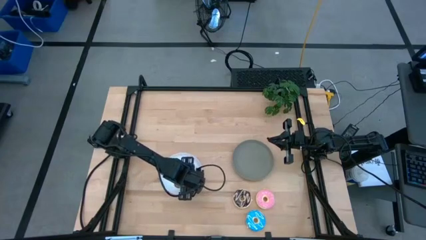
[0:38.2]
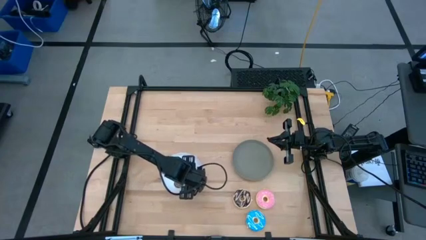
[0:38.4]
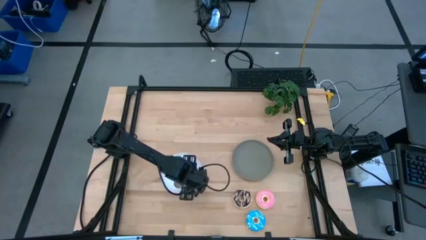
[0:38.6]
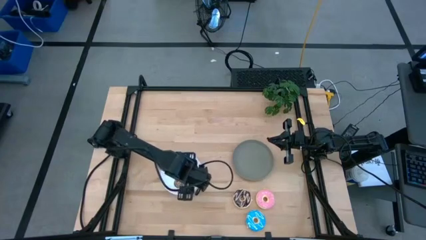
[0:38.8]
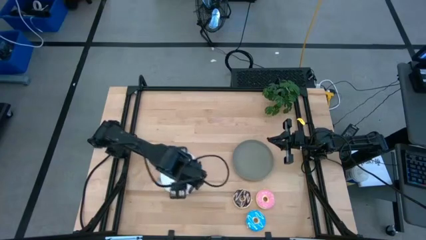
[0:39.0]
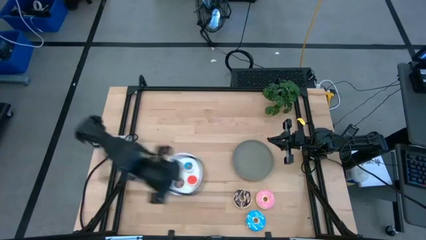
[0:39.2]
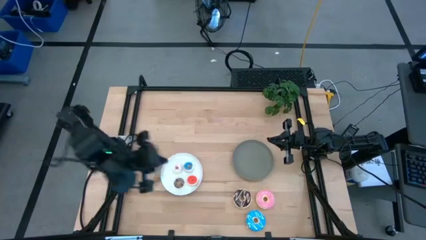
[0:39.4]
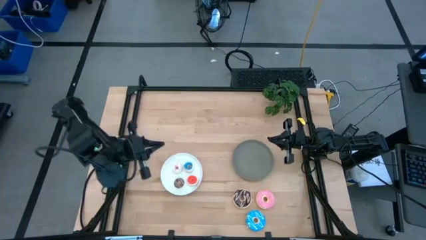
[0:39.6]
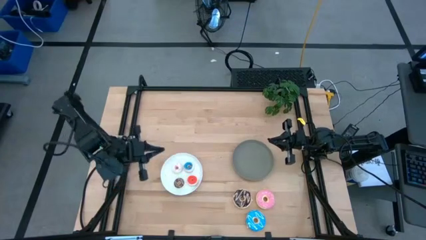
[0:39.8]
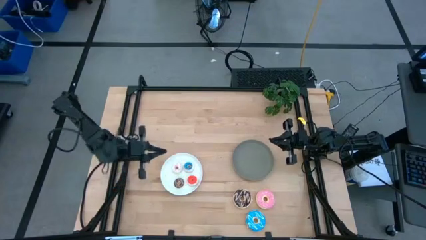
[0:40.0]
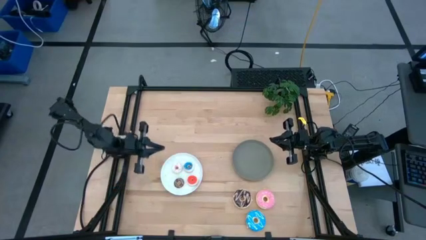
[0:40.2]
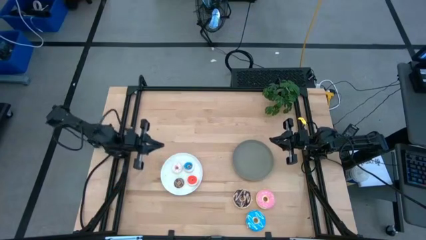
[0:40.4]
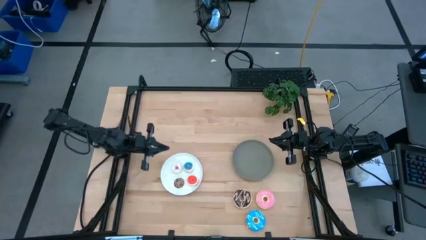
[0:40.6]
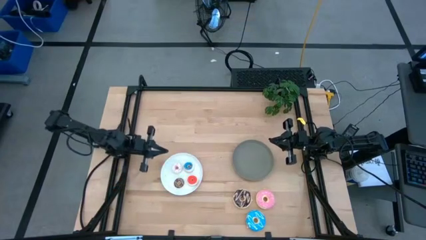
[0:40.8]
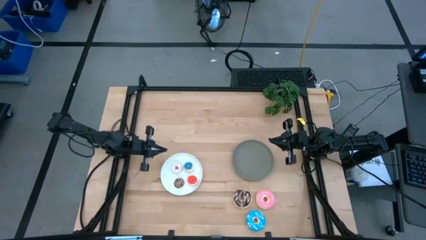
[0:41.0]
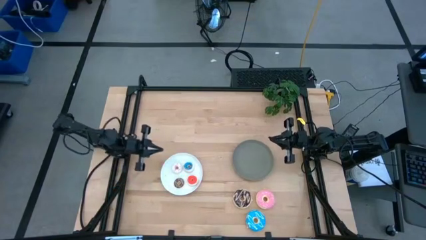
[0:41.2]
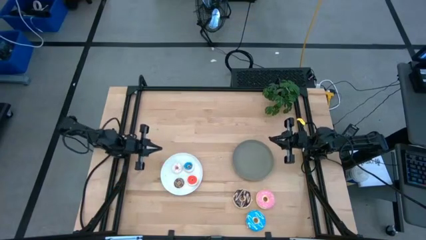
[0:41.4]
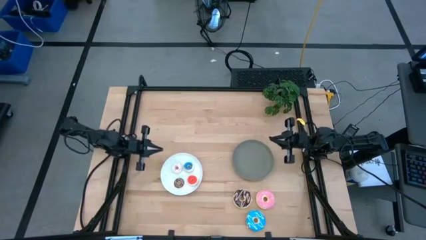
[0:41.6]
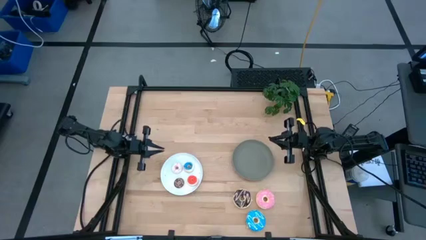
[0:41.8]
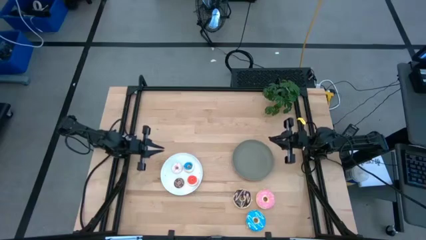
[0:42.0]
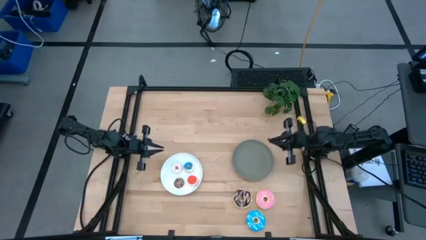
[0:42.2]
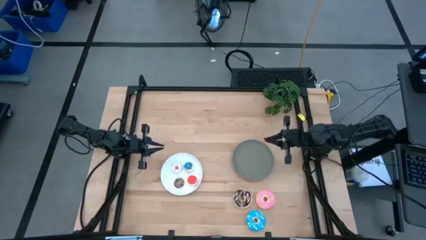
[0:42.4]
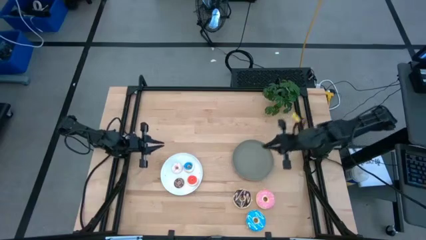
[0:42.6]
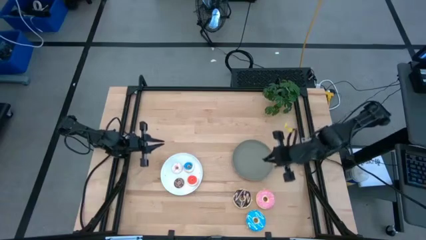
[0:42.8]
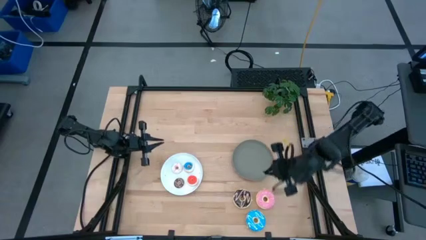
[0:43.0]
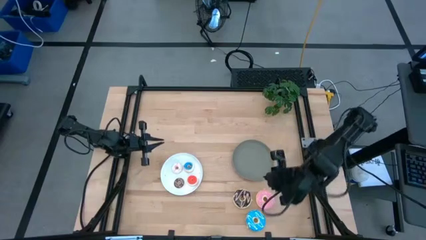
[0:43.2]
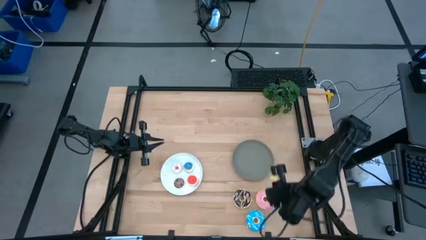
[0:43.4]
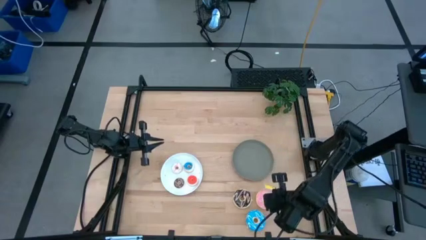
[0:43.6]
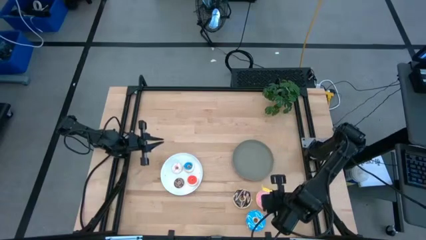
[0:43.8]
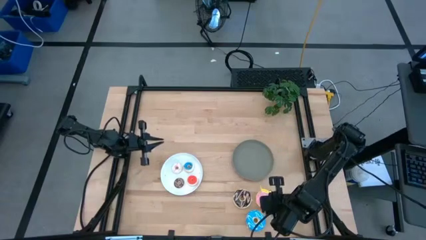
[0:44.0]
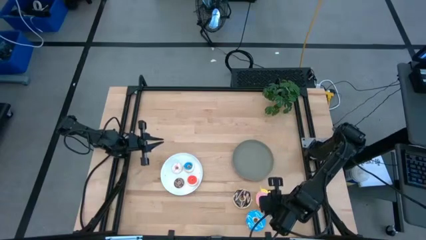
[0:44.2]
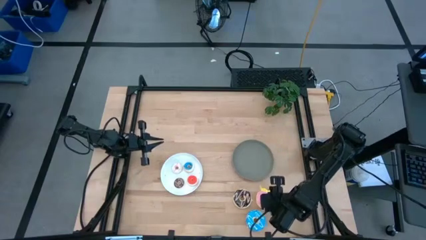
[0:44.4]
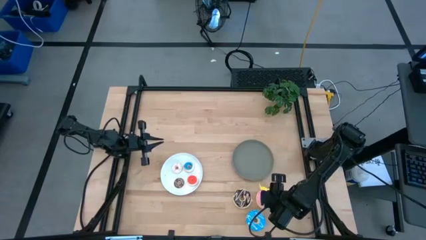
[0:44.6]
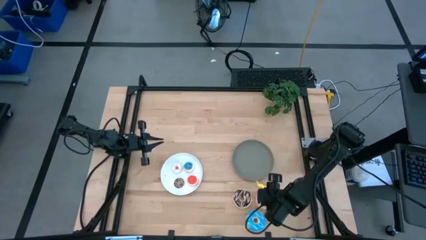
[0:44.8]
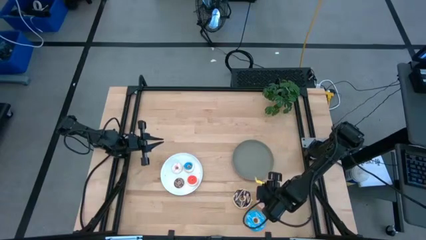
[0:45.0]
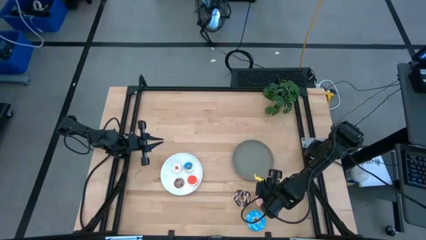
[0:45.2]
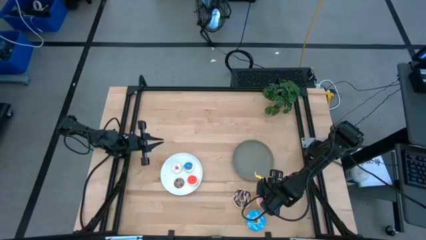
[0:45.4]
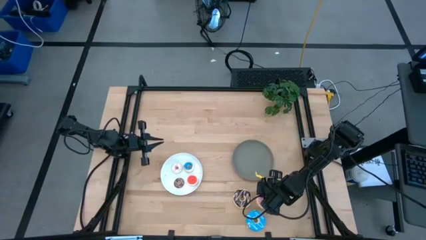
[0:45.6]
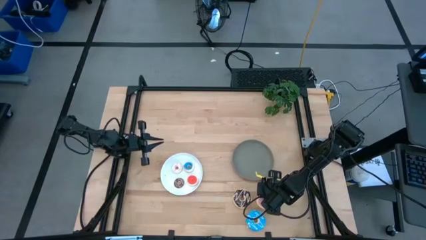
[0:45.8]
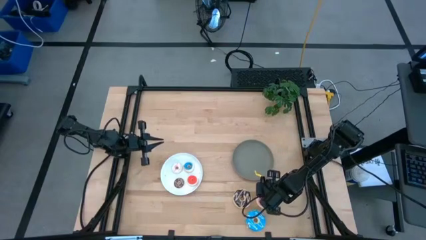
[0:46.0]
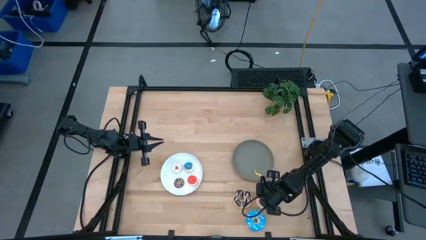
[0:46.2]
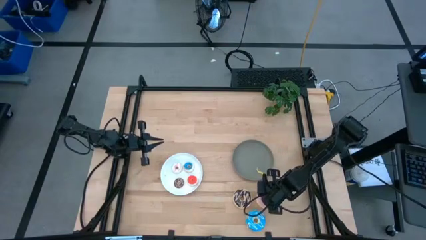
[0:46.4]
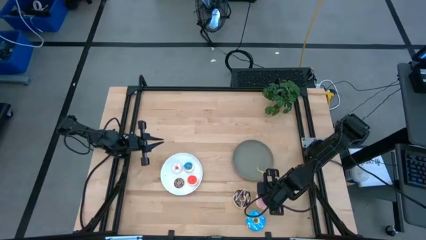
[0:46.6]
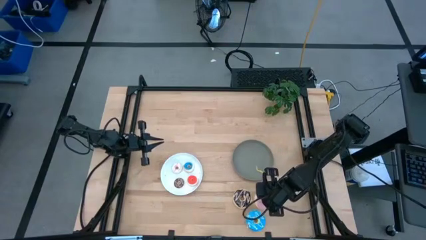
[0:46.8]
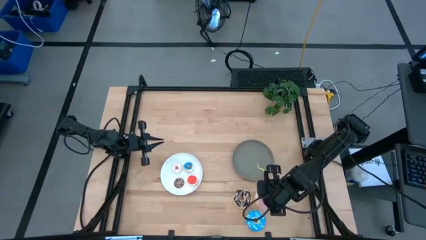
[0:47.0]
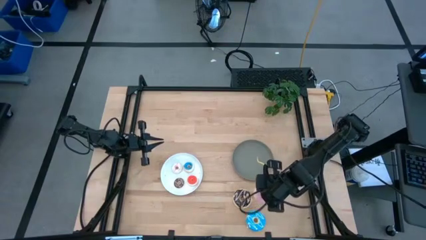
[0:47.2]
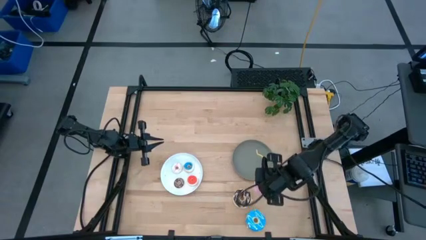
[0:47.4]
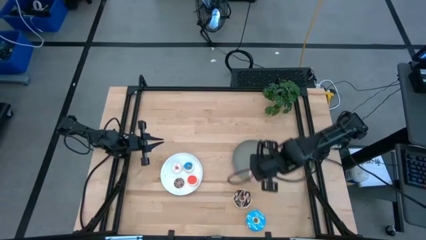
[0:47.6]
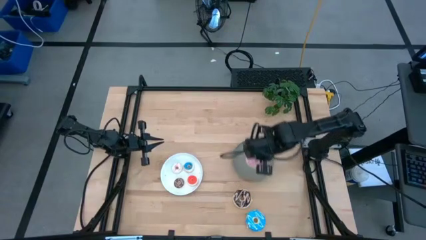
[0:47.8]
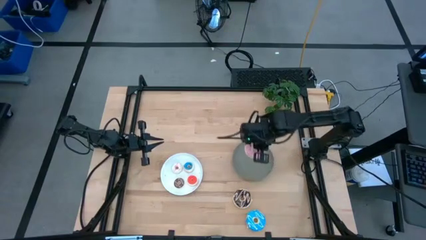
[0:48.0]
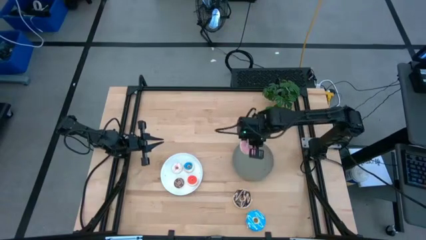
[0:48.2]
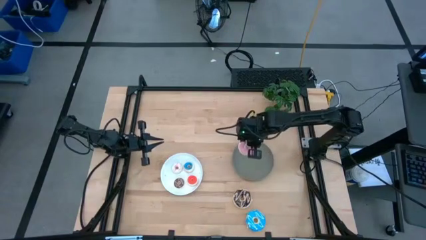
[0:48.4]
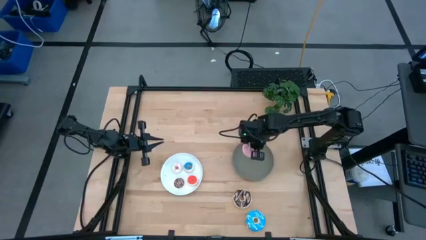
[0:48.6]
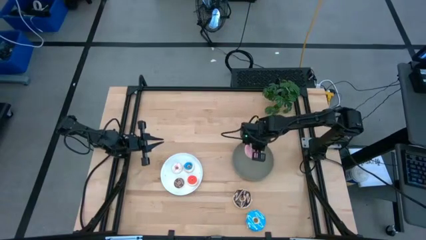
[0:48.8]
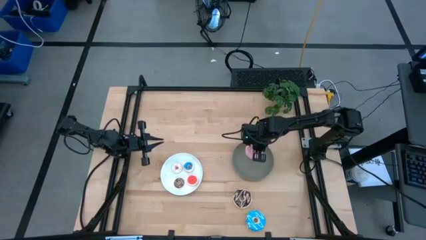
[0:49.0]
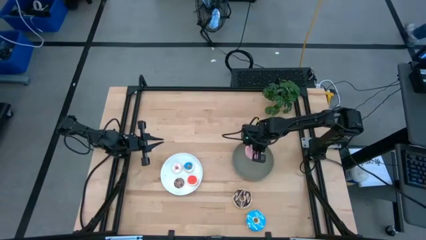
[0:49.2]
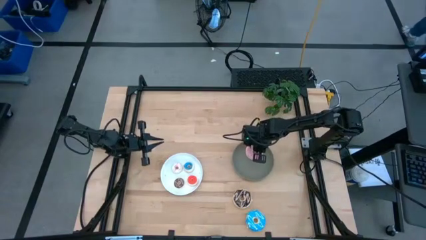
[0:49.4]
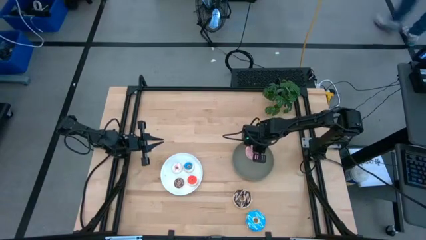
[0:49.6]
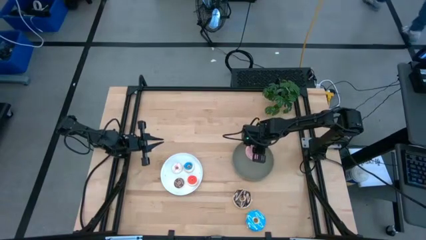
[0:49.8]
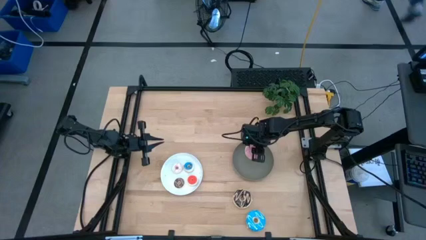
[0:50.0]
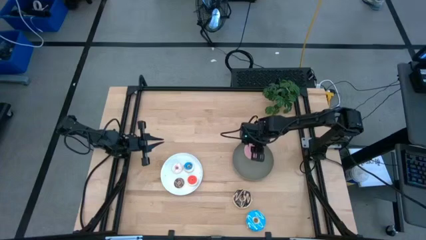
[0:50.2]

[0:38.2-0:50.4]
Task: Pick & Place donuts
Put the large pink donut on the gray plate

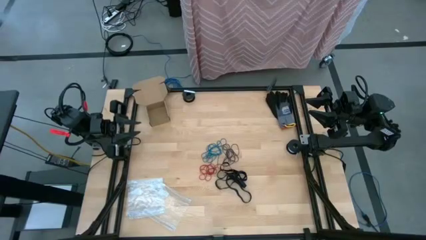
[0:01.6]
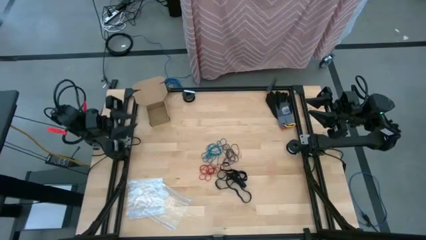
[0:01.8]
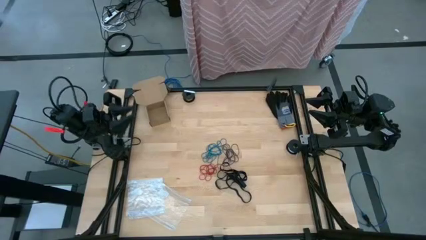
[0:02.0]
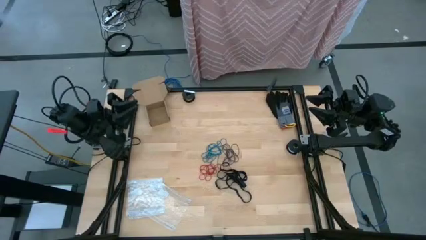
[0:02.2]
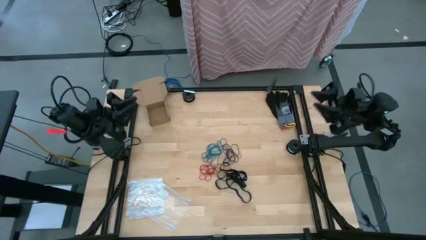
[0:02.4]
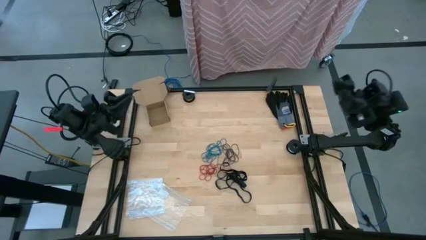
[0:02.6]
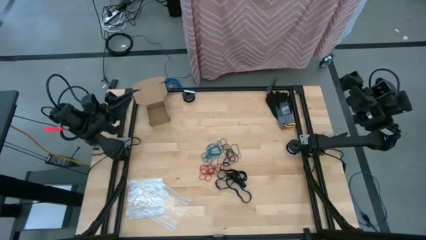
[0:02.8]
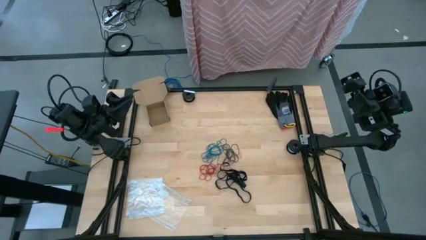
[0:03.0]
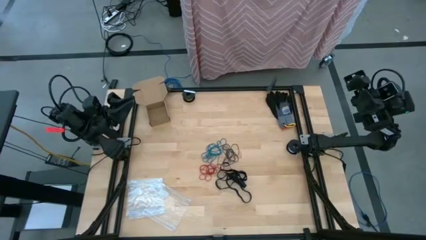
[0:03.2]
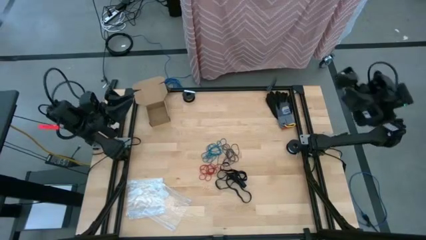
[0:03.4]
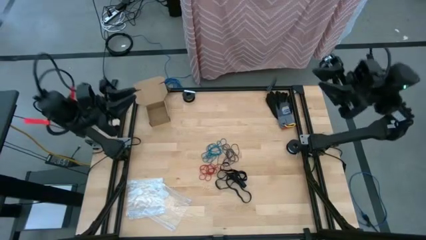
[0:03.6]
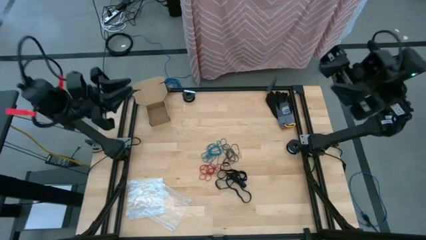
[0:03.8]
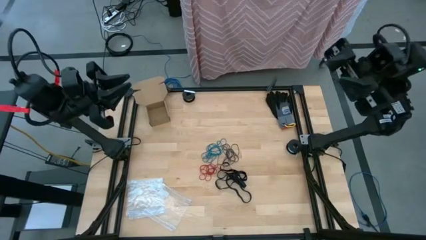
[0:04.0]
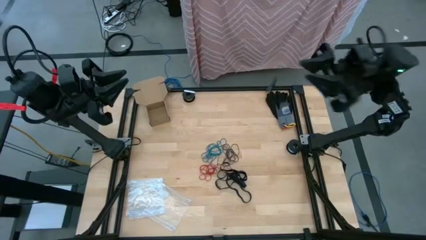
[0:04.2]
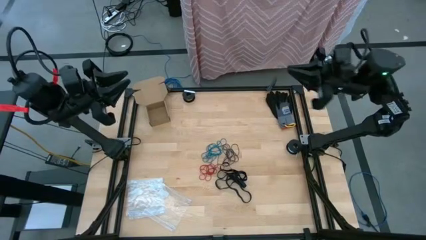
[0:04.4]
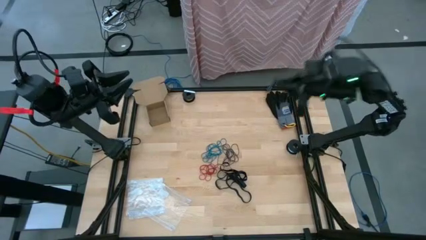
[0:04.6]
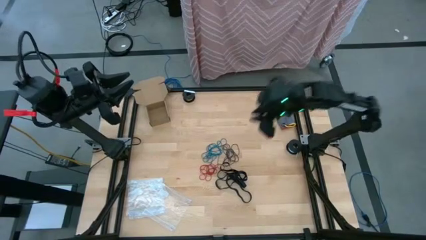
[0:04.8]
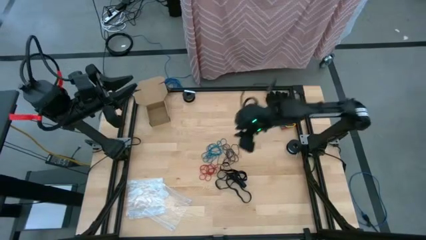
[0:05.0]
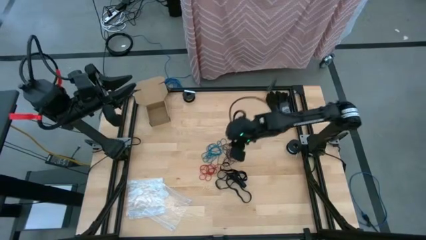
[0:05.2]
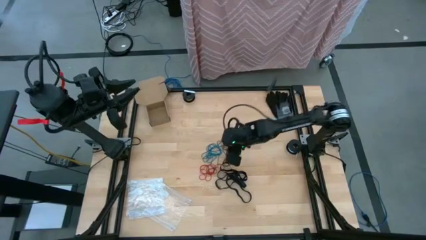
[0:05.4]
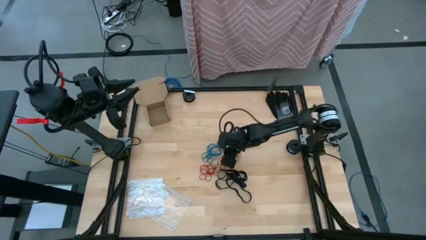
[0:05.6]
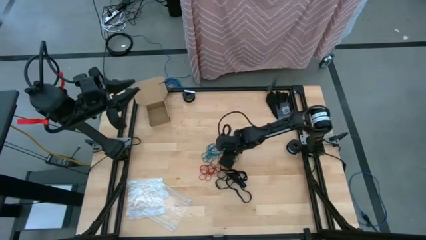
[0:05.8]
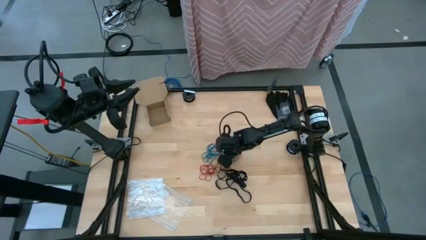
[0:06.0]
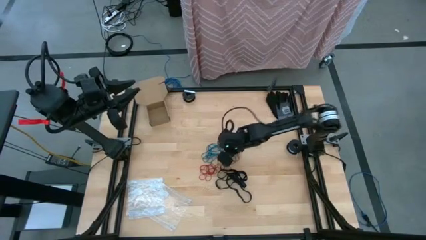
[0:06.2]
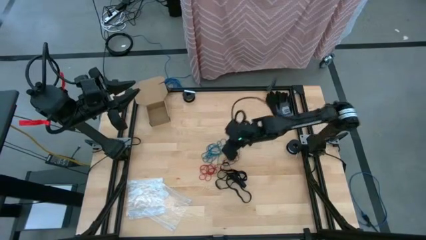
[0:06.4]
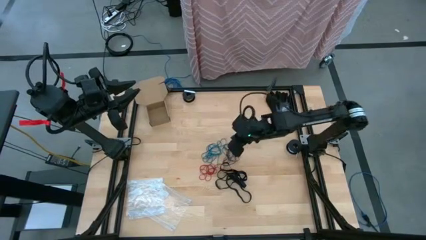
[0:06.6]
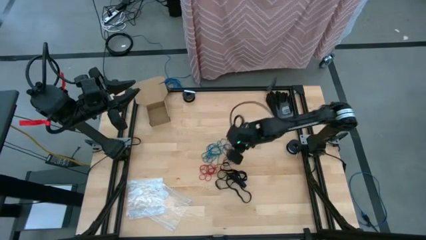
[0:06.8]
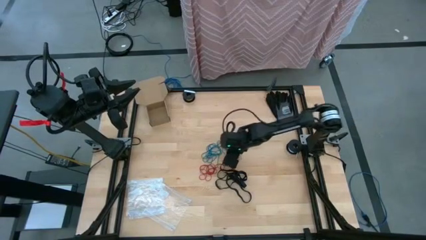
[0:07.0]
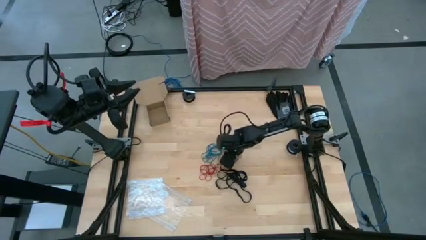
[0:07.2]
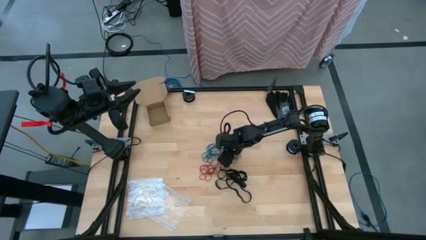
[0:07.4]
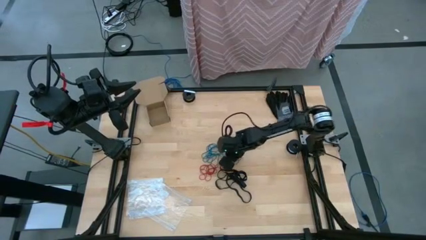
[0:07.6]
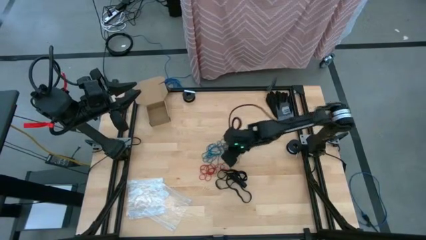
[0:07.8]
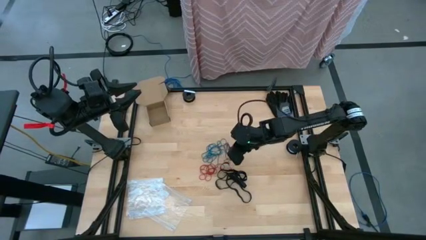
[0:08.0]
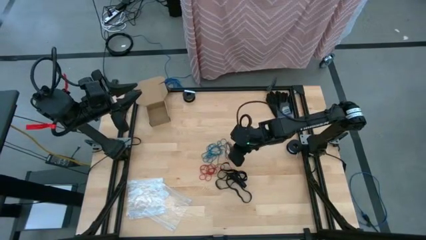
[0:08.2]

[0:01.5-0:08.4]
Task: Sort rubber bands
Put the black rubber band into the transparent zip bag
